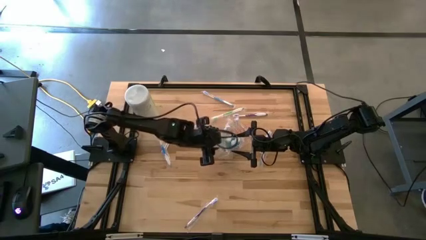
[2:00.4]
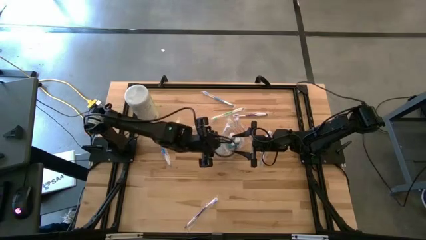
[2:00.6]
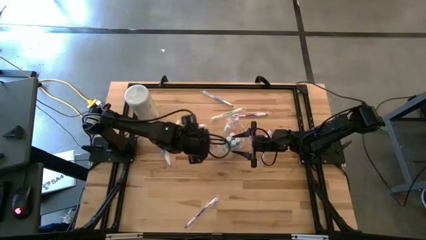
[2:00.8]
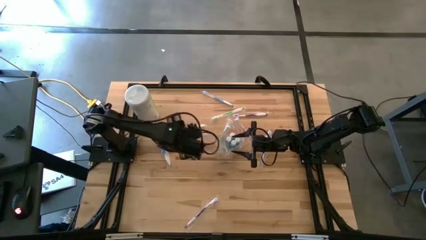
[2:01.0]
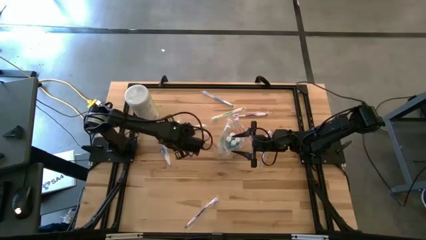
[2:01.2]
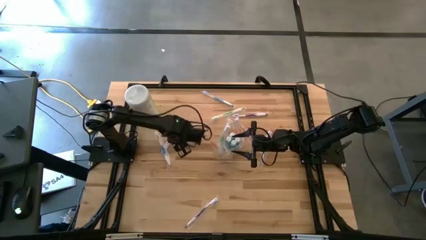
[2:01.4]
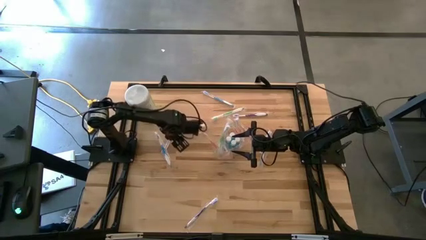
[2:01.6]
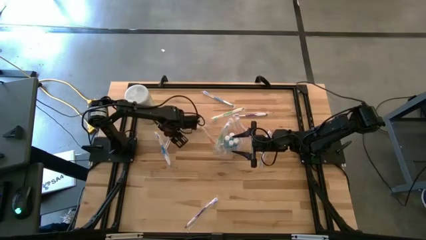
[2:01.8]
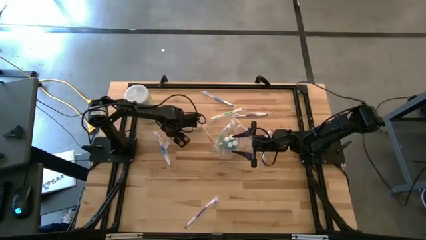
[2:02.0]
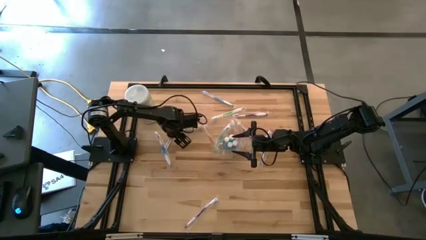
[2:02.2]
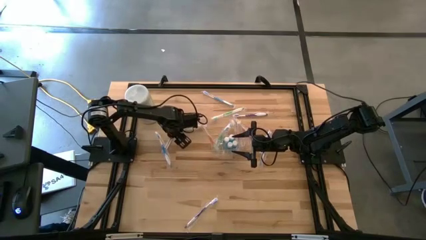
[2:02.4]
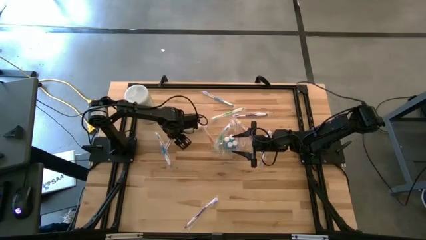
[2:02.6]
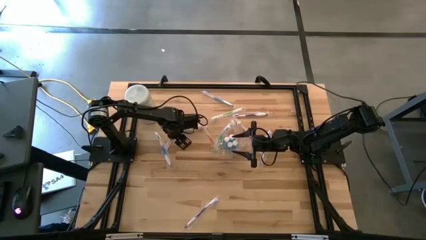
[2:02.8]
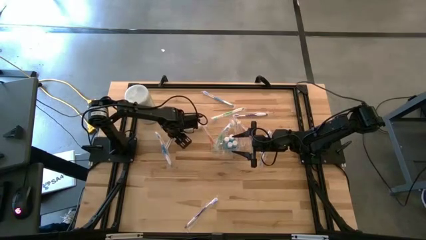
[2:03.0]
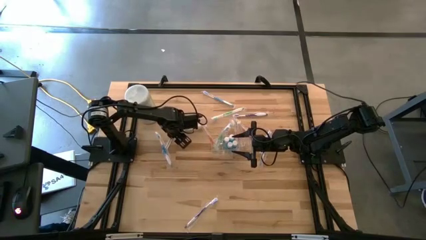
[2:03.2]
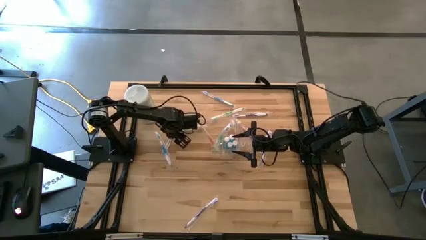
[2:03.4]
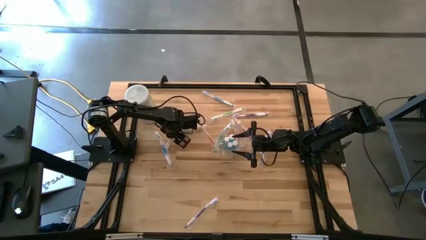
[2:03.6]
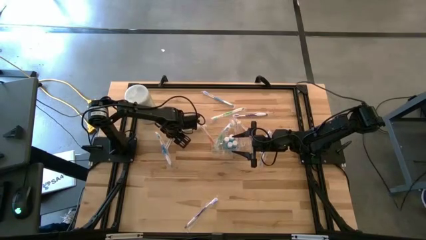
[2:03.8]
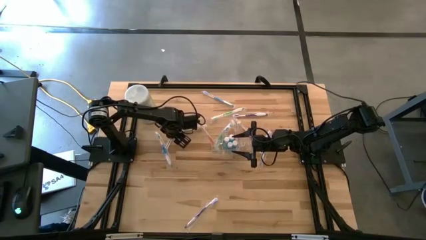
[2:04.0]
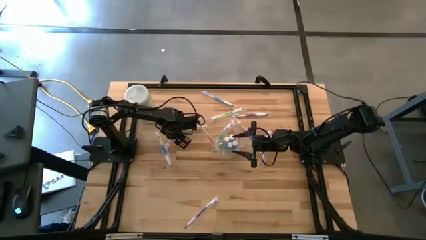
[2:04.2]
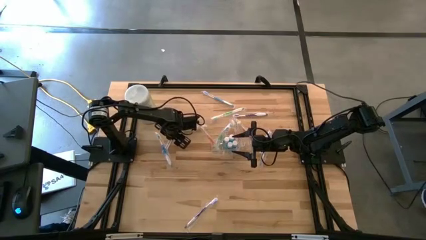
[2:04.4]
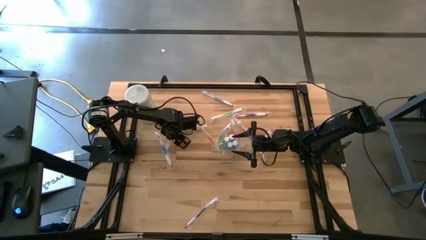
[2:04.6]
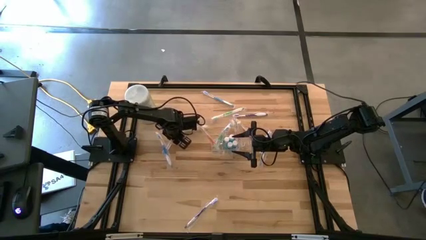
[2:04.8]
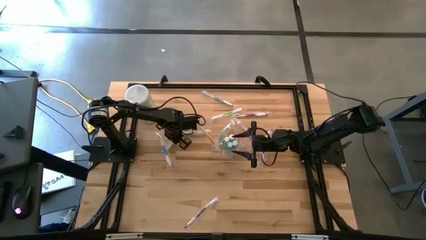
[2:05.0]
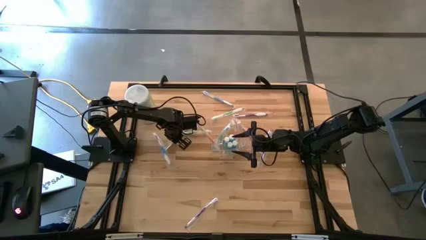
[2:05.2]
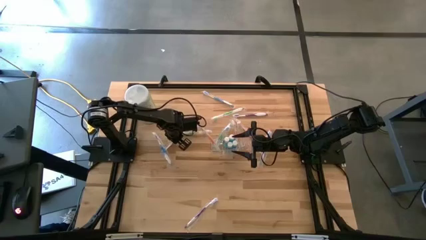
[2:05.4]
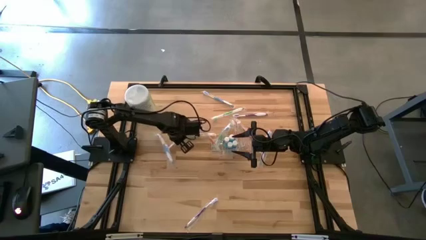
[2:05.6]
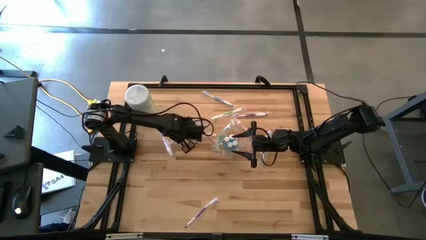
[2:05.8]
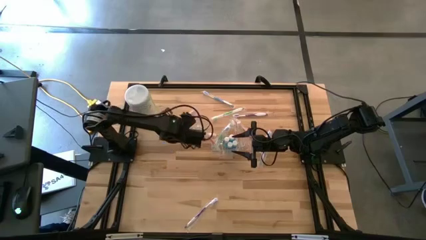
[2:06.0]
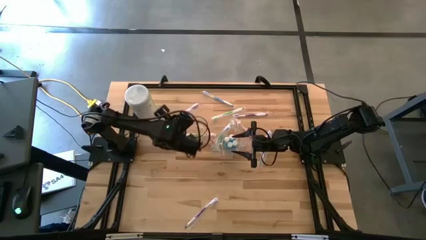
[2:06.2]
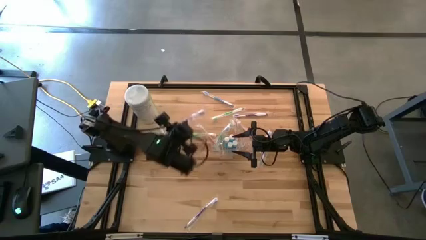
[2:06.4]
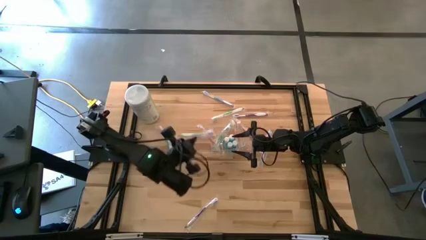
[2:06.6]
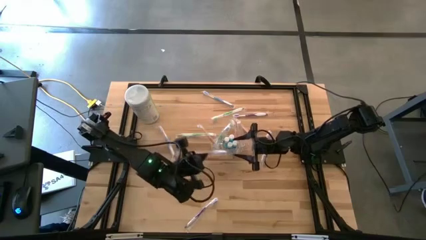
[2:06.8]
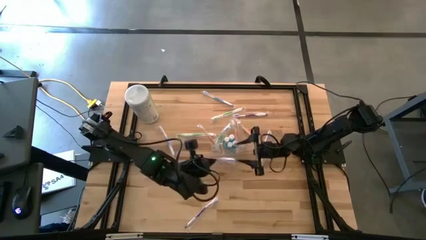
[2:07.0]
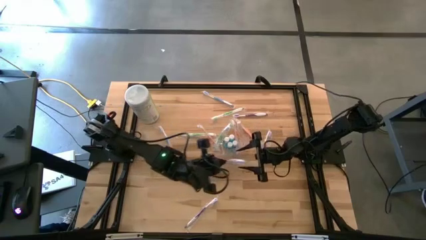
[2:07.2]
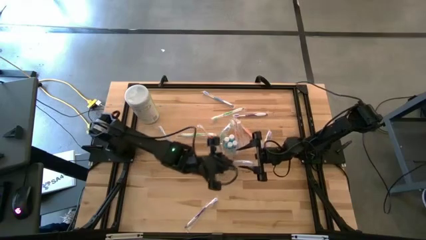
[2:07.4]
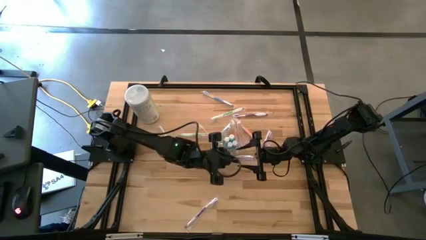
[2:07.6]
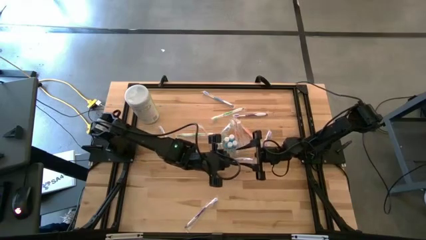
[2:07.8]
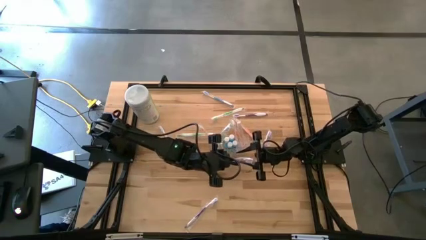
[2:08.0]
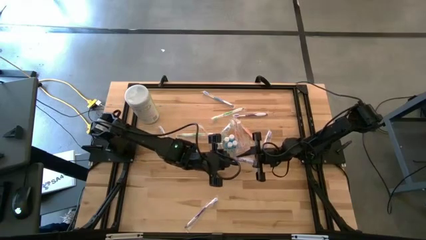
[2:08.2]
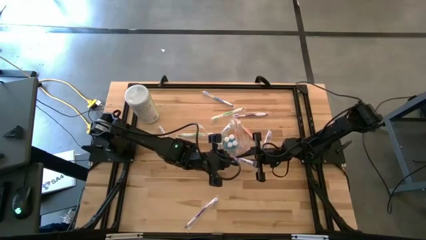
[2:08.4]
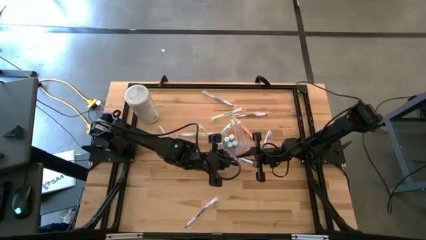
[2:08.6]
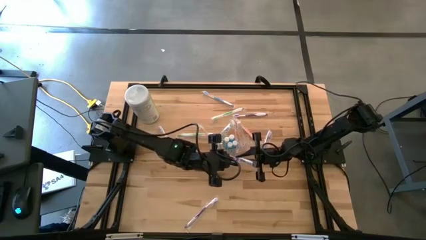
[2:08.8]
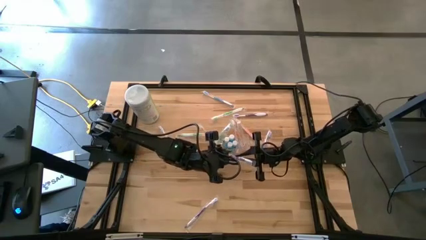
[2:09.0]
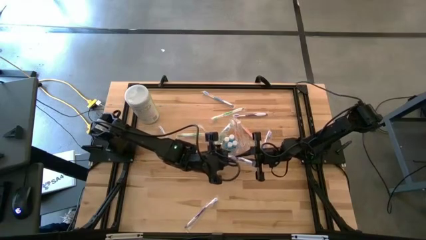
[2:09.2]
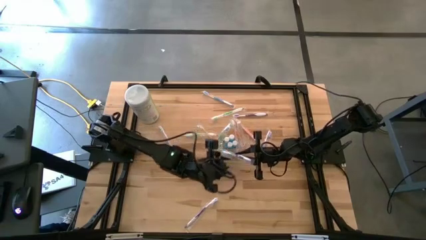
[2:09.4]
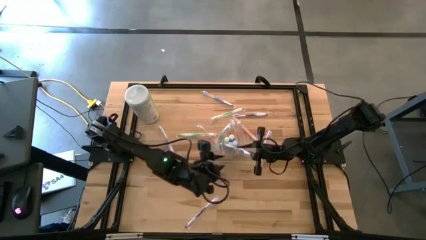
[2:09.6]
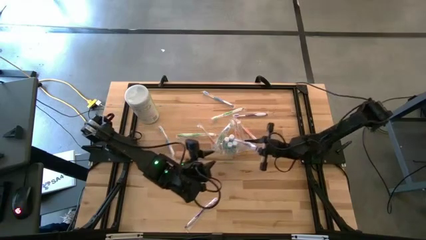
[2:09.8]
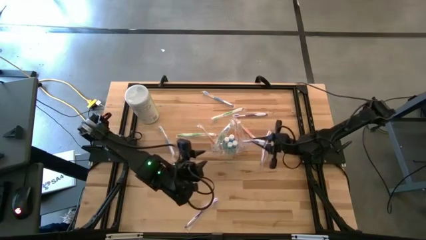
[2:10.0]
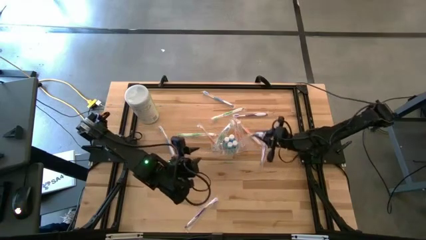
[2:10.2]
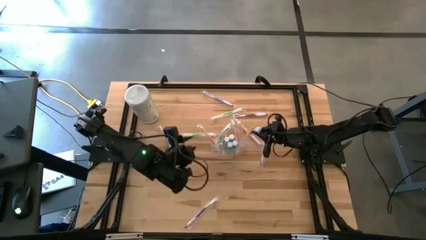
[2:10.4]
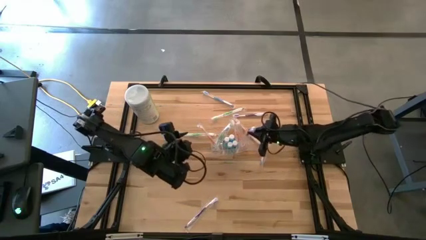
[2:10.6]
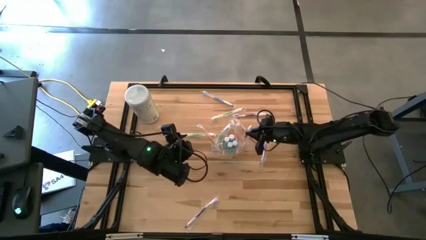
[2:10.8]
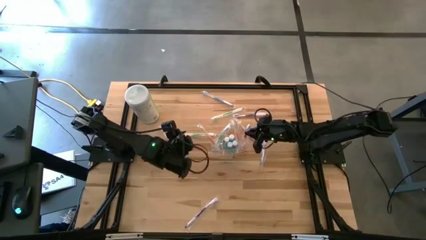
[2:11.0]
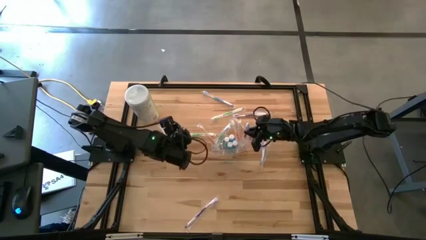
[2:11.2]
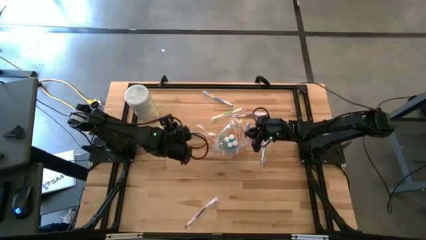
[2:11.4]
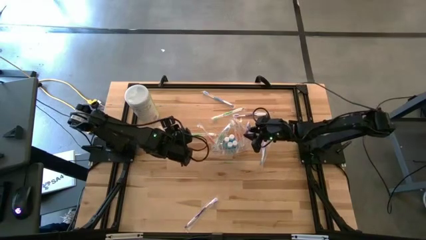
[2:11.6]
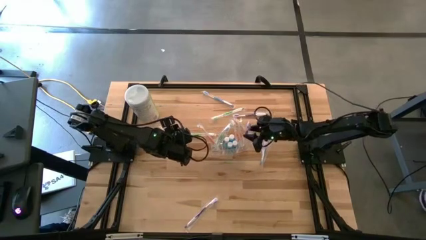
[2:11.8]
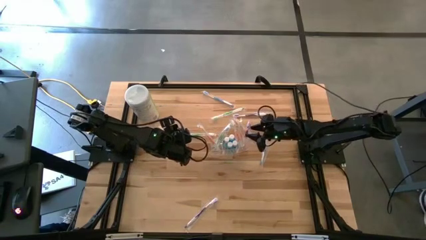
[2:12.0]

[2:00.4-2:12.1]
Task: Pick & Place toothbrushing station
Put the violet toothbrush into the transparent organizer

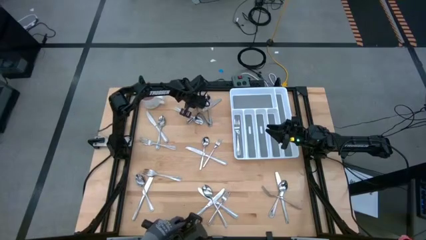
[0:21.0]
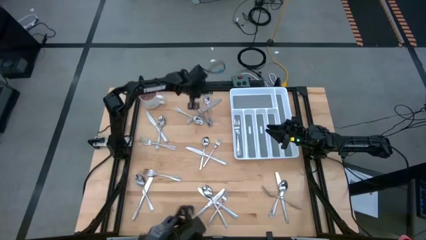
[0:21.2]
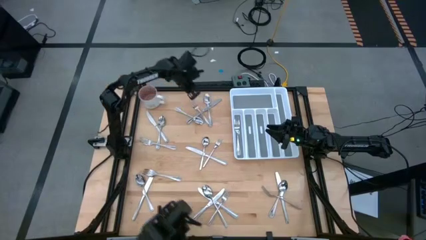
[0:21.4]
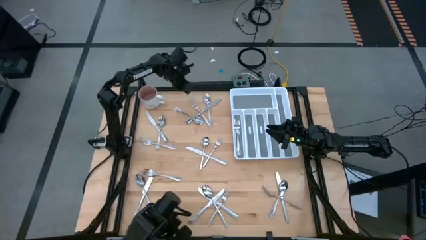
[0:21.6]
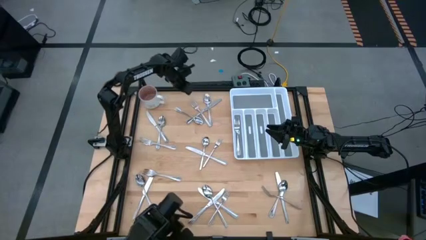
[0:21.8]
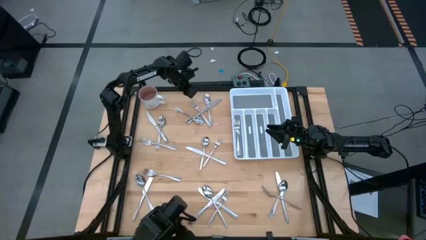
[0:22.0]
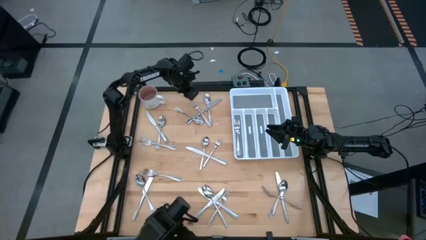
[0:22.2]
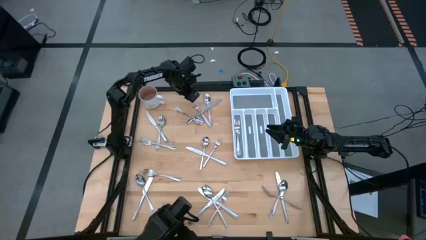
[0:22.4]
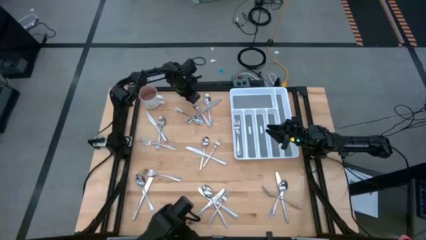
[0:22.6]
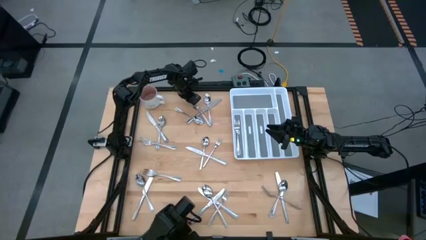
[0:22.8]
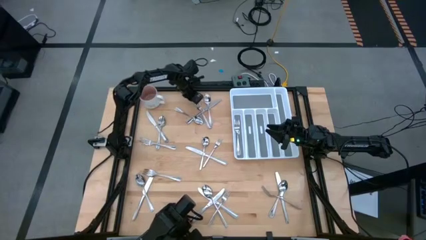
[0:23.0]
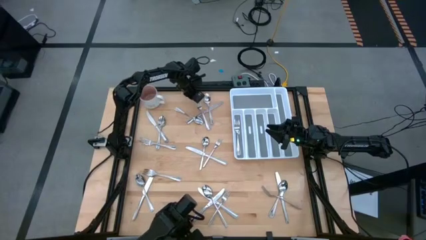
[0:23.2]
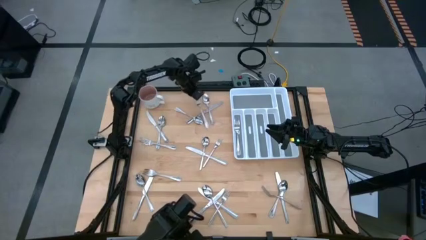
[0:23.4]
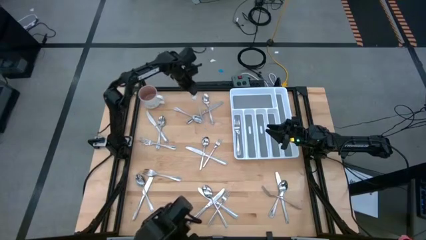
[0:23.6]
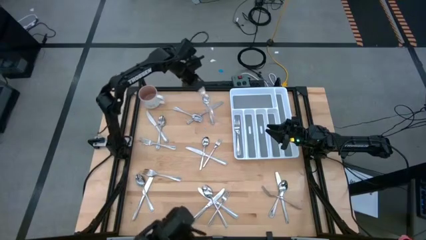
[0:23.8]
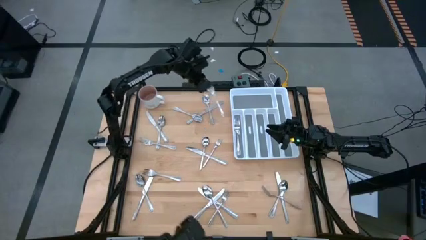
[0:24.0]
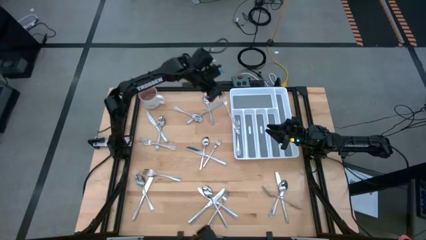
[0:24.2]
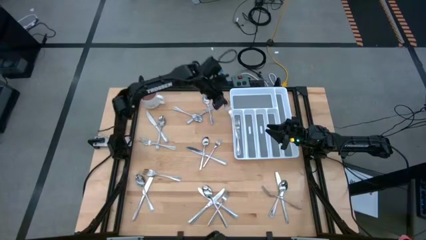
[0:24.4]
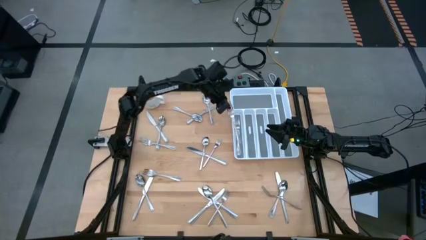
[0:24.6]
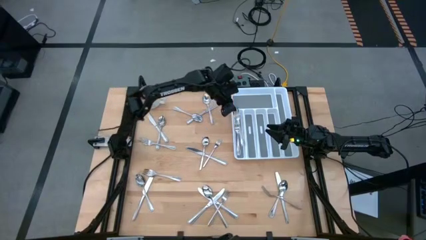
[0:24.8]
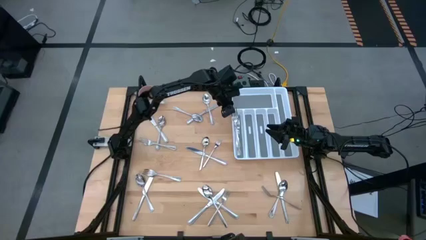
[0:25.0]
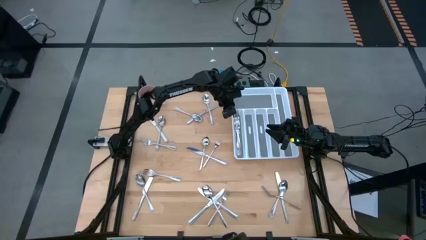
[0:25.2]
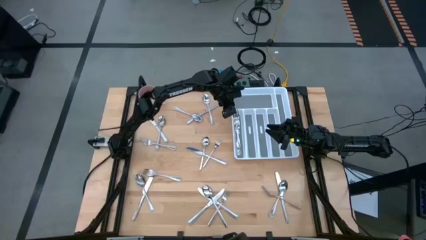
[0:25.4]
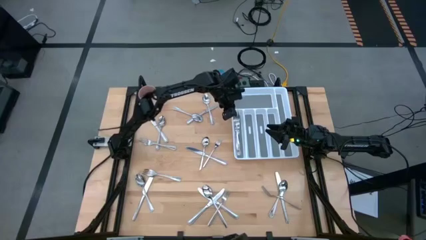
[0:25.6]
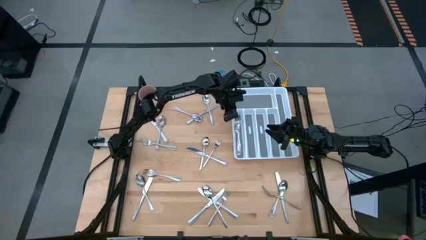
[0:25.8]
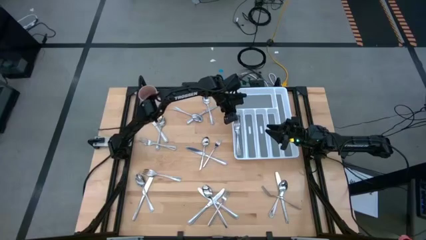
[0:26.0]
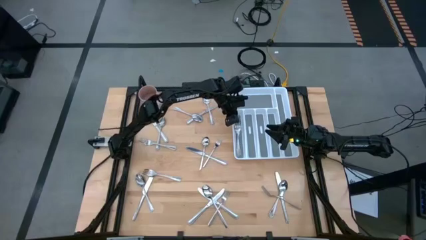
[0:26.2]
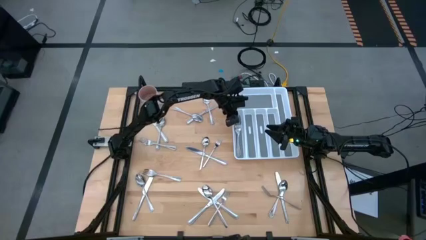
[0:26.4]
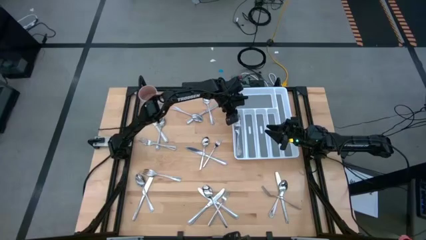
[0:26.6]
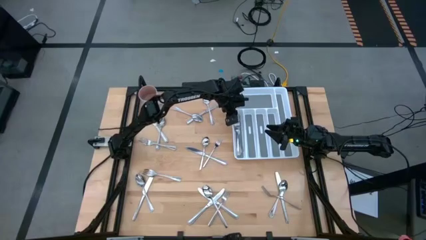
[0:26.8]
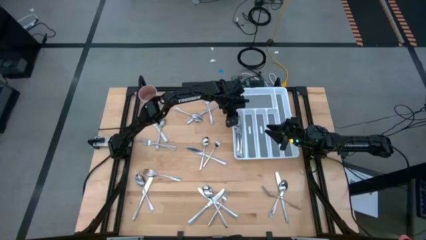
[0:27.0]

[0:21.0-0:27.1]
Task: Sort silverware
Put the silver fork into the silverware tray
